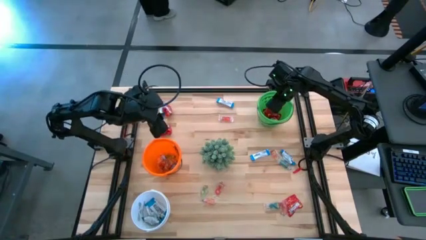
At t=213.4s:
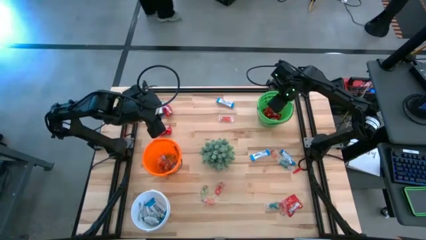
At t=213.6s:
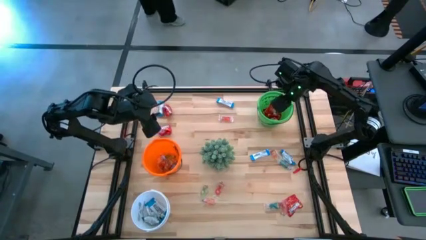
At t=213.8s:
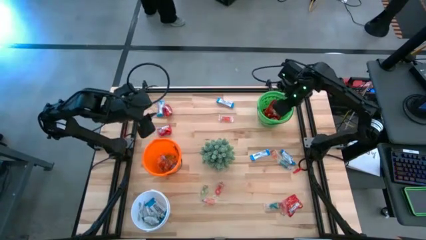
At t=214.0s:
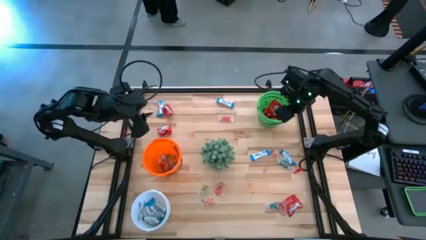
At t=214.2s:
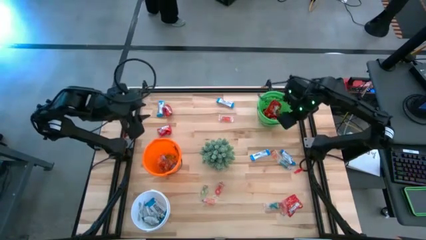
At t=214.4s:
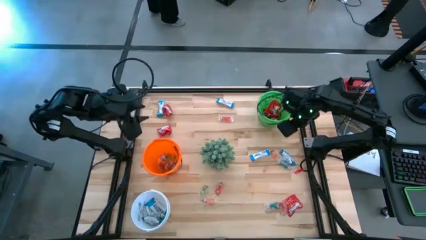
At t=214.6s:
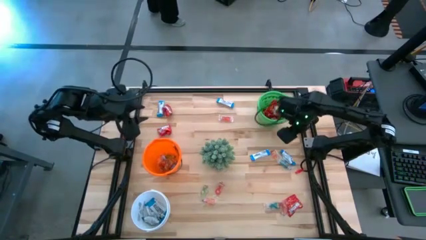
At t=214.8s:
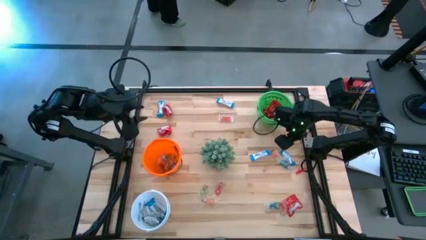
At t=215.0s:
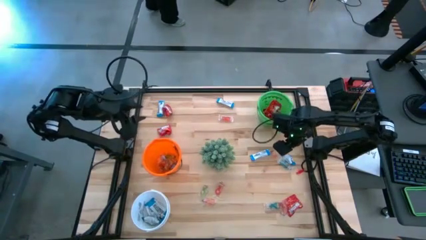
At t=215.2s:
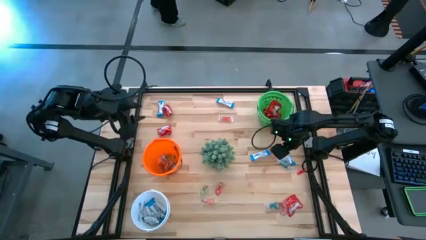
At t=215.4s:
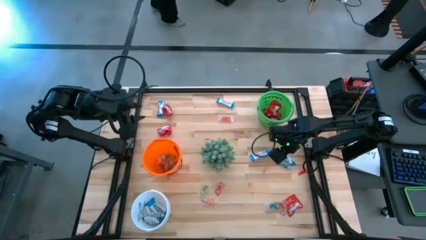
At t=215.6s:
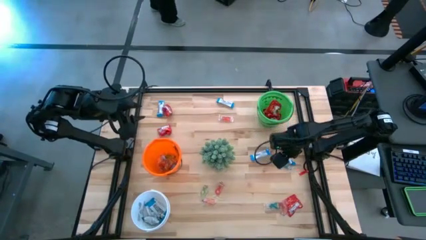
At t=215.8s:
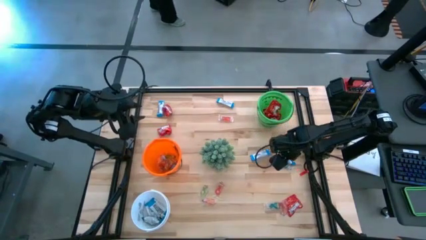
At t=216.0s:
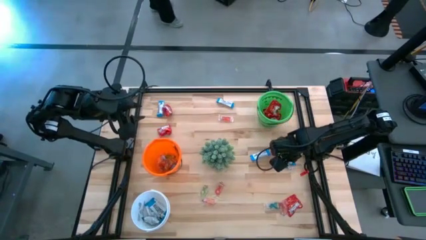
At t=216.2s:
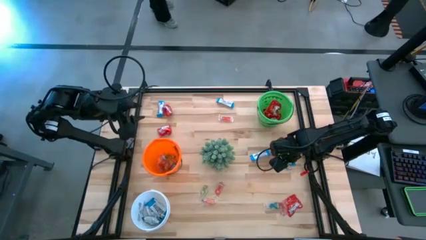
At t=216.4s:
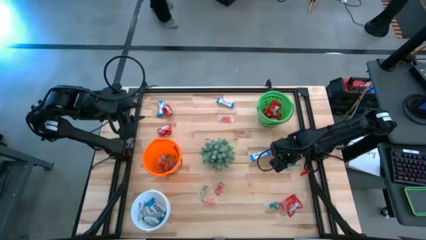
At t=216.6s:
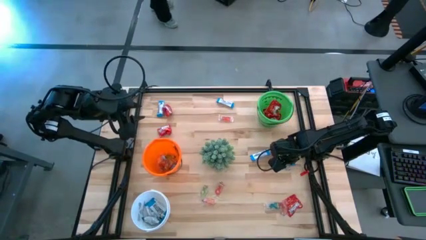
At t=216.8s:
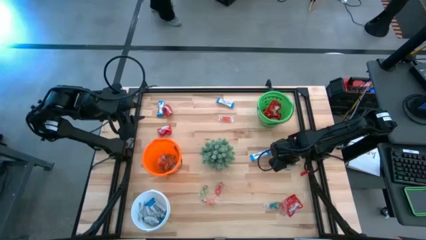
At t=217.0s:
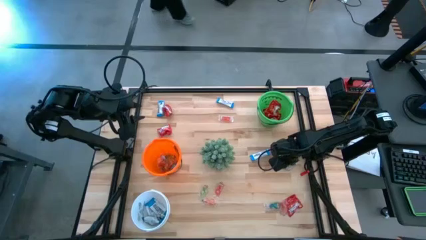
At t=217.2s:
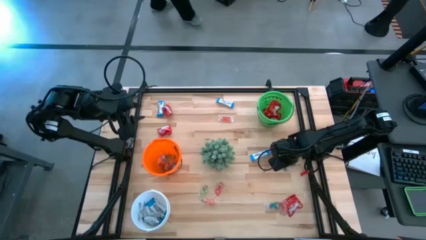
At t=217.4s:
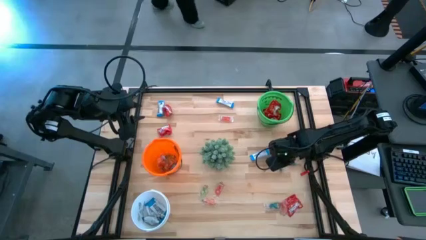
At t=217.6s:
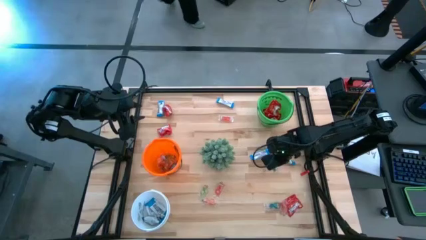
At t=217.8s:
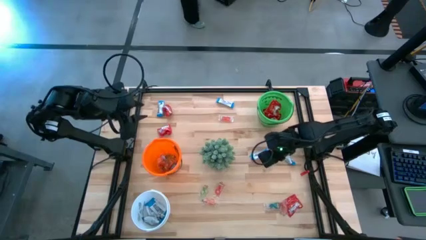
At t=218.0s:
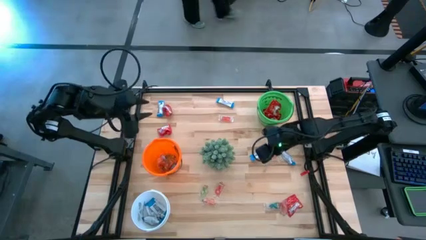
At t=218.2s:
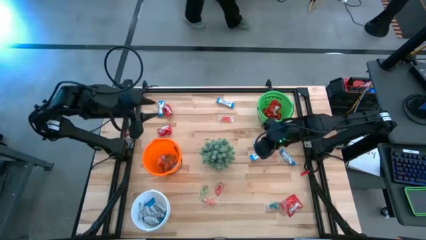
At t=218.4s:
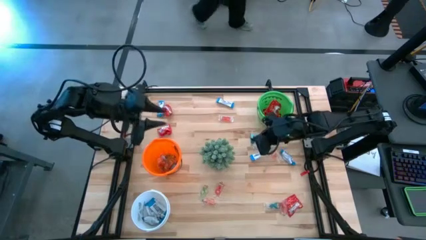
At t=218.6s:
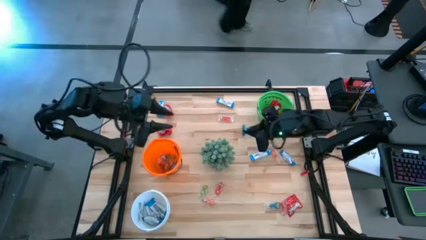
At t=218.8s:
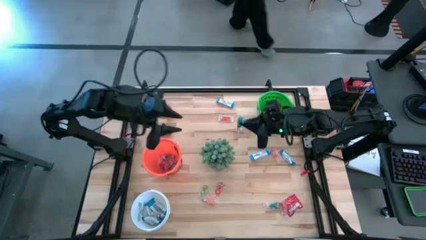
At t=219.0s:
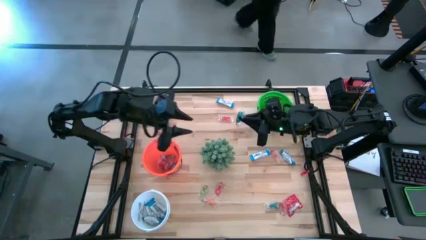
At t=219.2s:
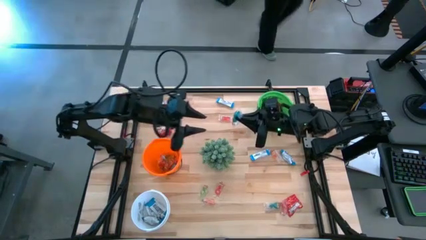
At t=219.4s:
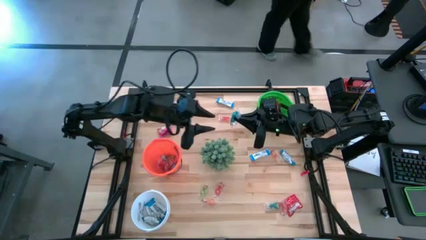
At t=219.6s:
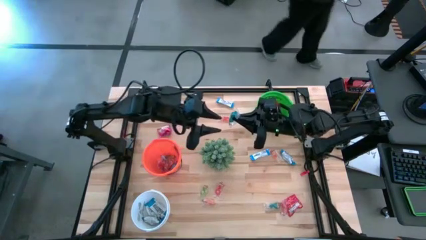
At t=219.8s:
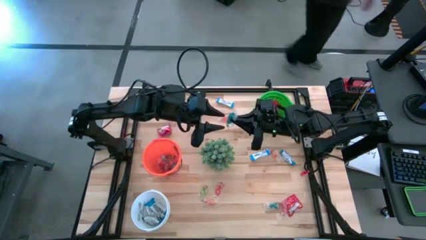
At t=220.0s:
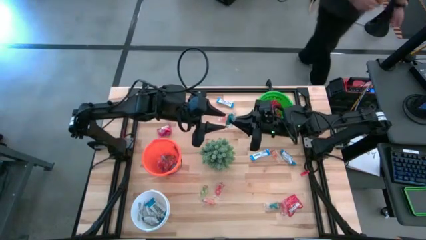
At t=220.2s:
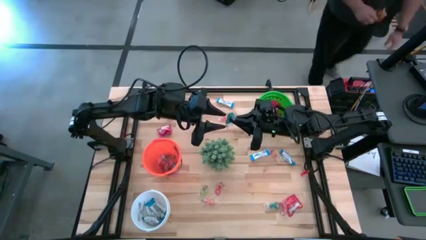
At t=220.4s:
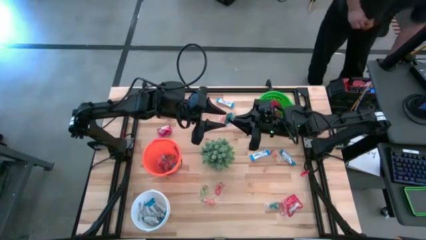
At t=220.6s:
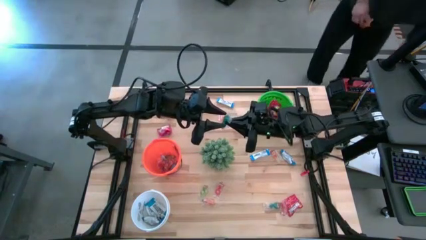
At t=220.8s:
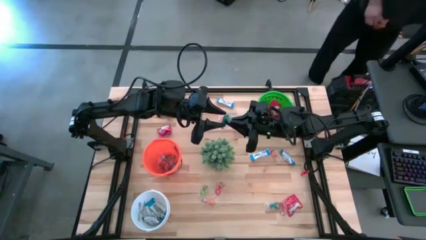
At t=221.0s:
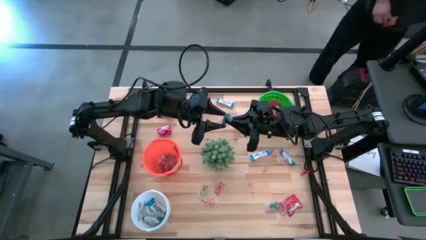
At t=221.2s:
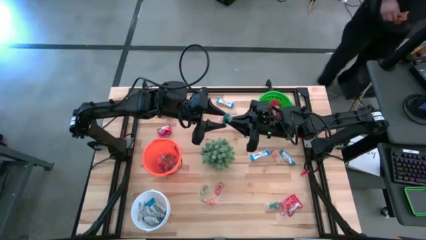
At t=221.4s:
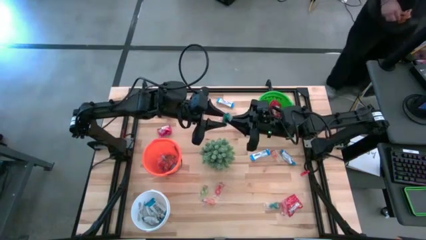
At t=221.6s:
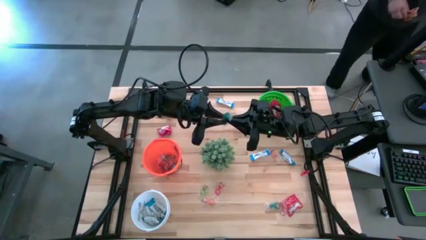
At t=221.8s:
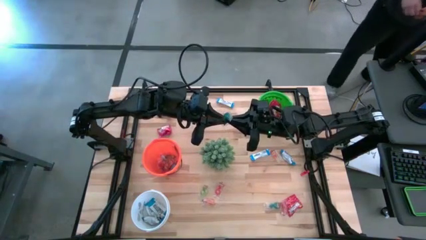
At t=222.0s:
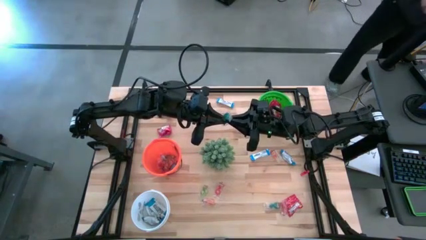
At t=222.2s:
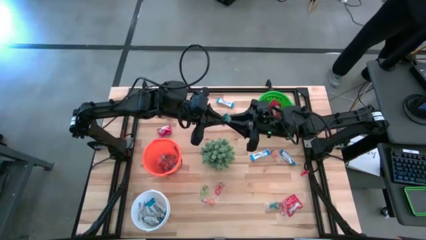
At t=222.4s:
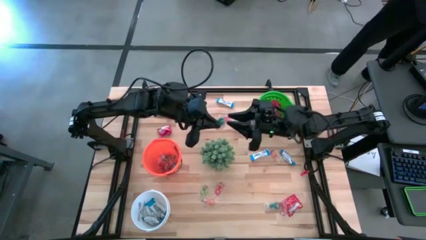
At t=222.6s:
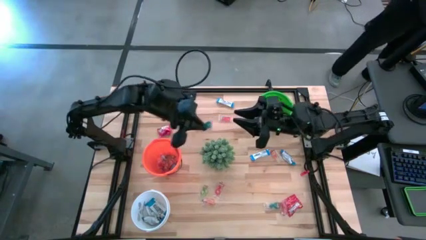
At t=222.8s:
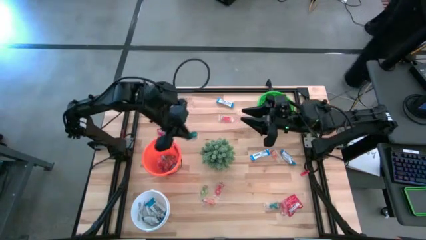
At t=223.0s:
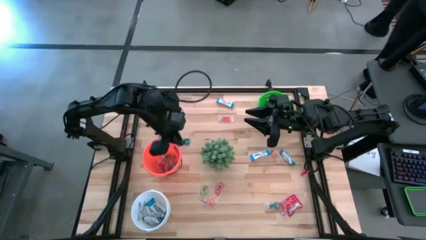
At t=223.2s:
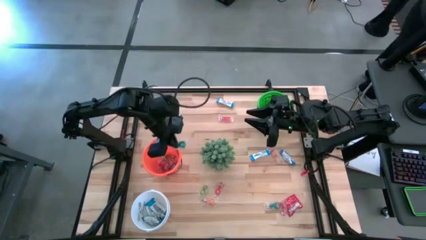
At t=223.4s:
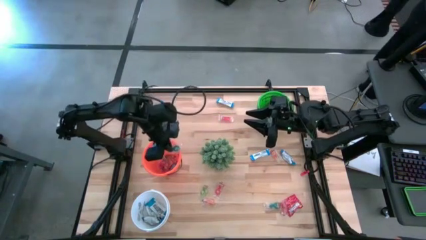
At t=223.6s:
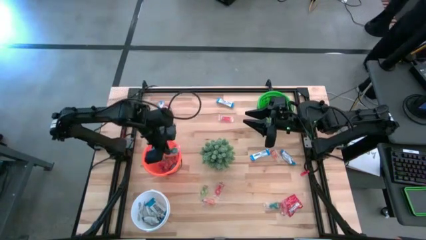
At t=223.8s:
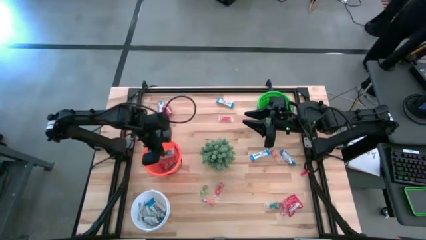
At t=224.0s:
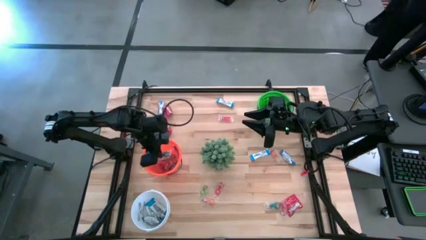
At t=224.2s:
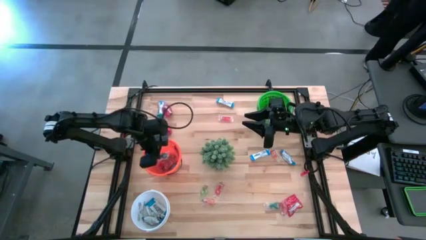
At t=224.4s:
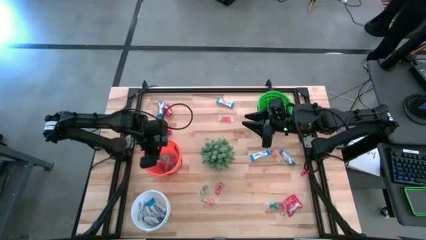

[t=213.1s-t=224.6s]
Task: Sort candy
Put the blue gummy into the orange bucket

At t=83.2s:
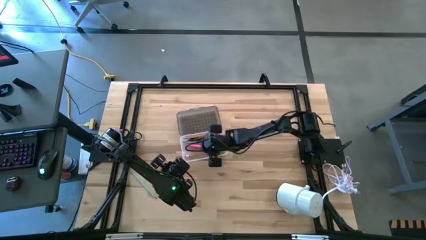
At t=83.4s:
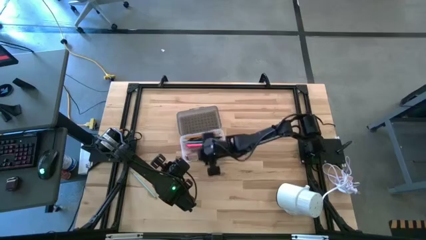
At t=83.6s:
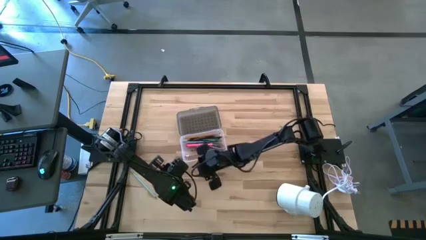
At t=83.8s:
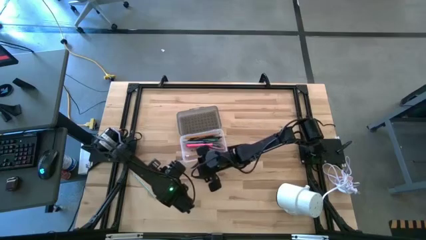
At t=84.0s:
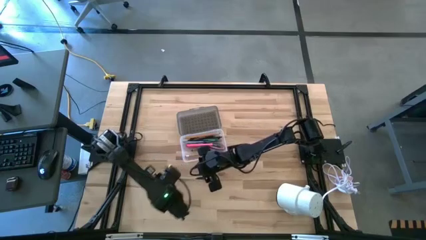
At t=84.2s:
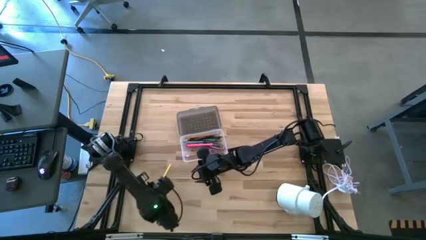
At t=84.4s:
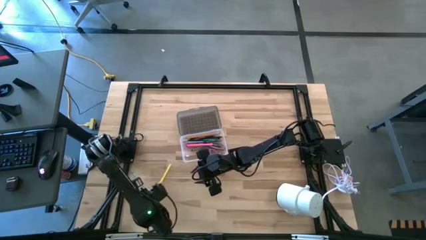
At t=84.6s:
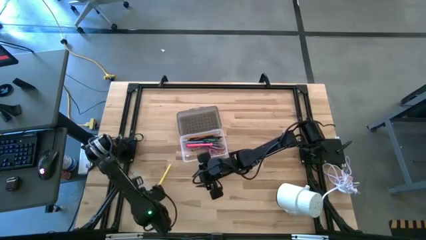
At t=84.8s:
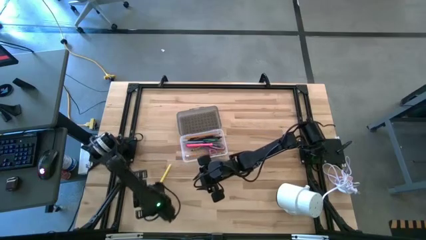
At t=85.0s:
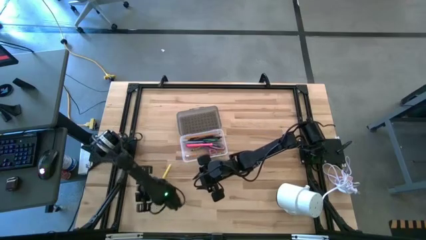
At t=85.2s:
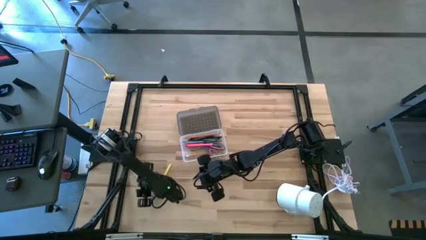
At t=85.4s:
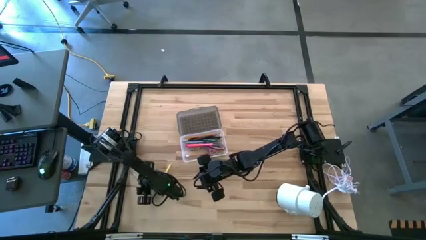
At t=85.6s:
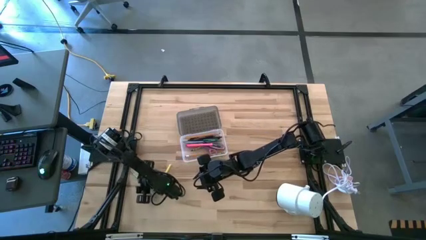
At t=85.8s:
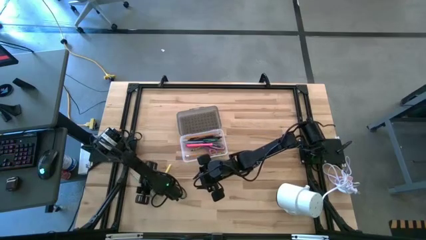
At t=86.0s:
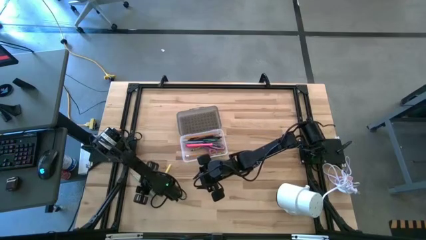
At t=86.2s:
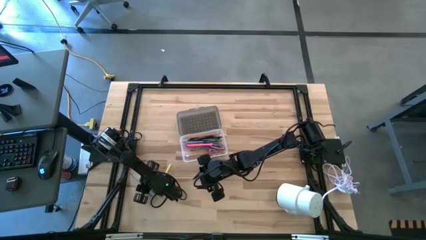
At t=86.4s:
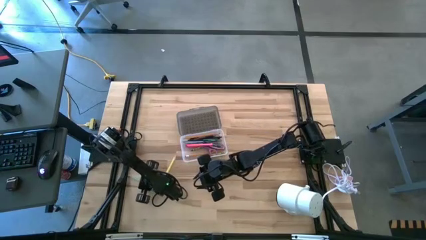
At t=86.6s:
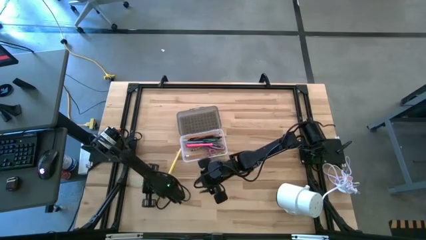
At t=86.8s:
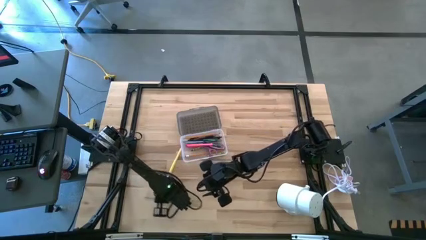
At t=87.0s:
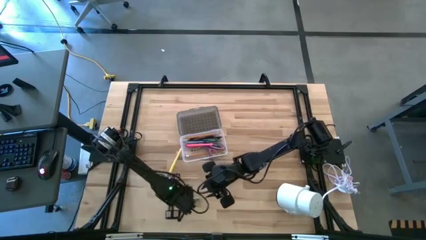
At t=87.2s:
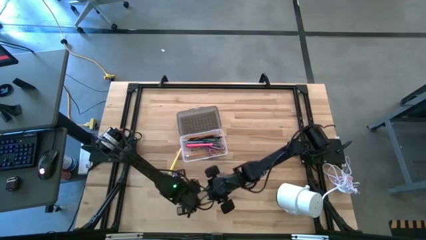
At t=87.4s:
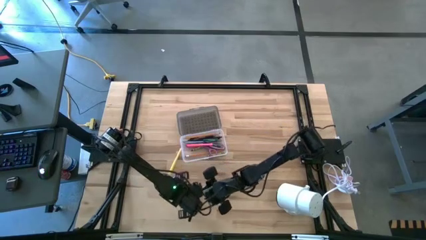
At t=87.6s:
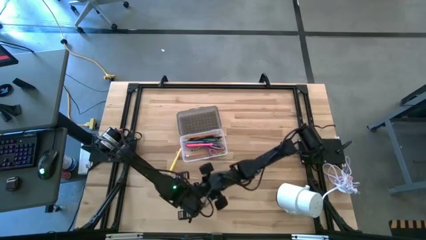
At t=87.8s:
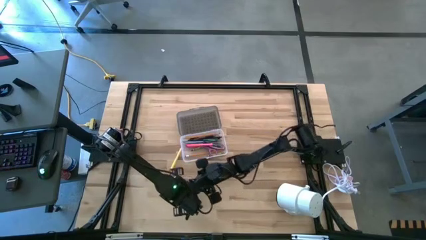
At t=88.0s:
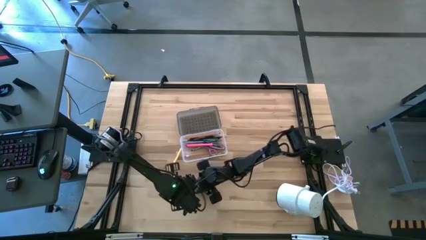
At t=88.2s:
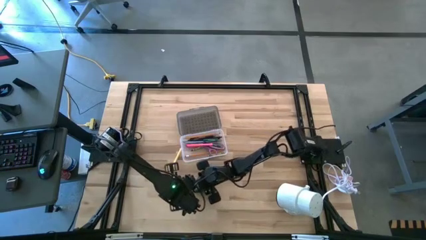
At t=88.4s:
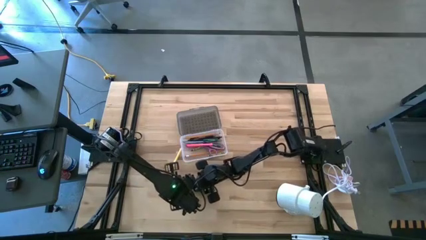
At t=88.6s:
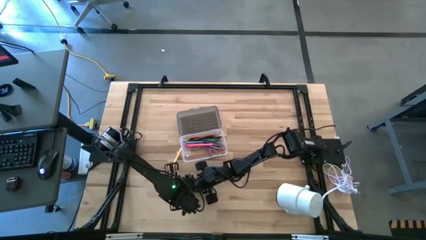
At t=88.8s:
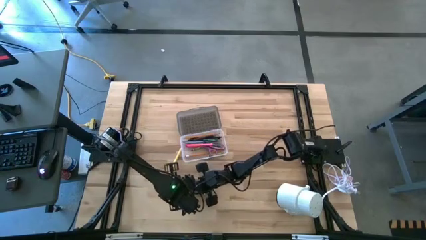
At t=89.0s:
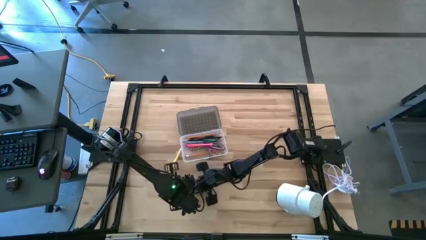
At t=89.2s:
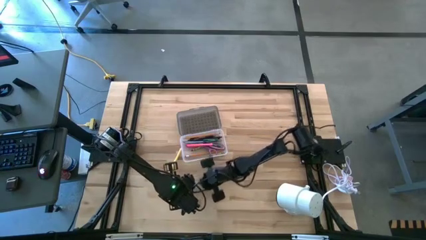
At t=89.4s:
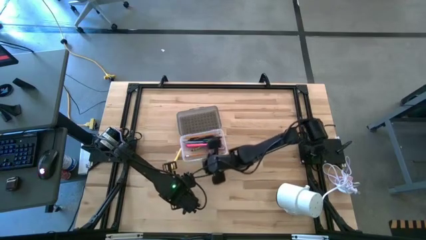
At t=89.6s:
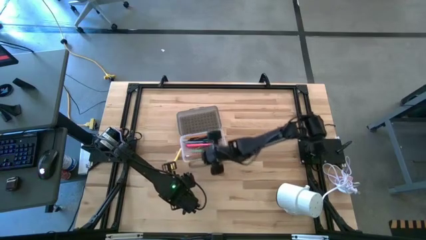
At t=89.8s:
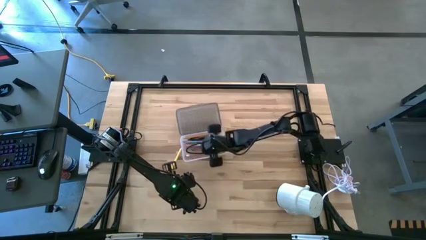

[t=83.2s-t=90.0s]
Task: Pick & place school supplies into a supply box
Put the blue pencil into the gray supply box
